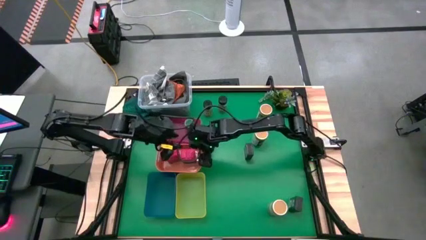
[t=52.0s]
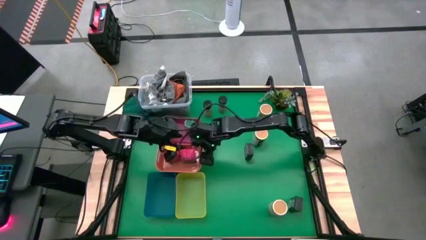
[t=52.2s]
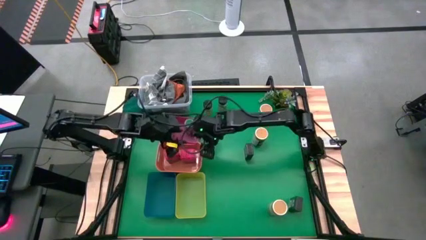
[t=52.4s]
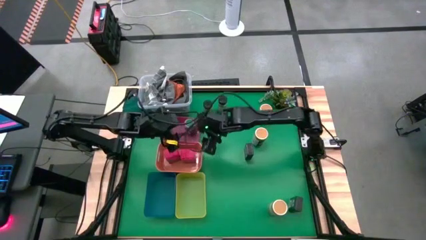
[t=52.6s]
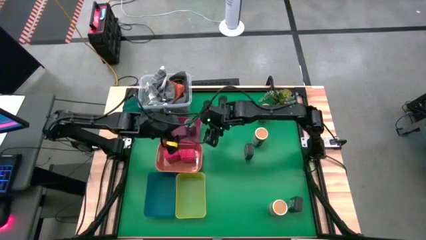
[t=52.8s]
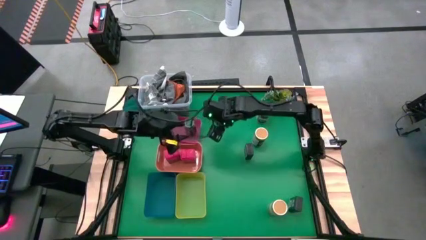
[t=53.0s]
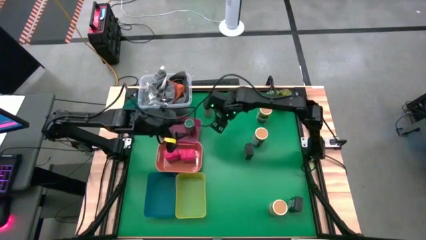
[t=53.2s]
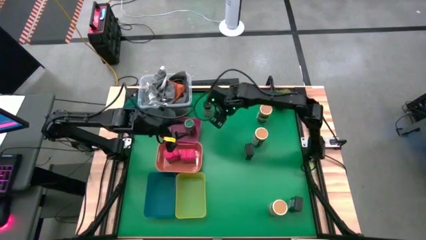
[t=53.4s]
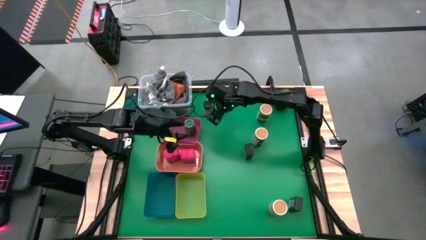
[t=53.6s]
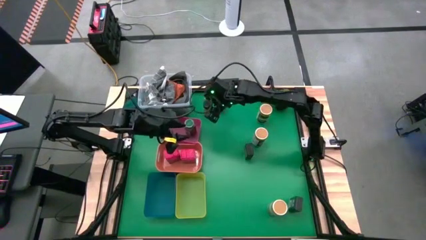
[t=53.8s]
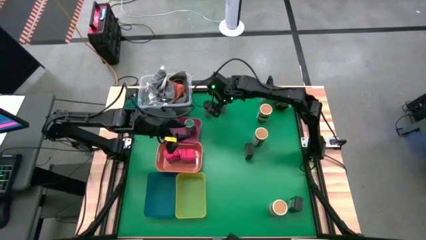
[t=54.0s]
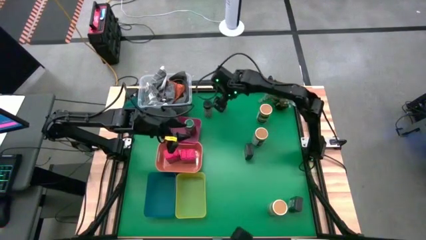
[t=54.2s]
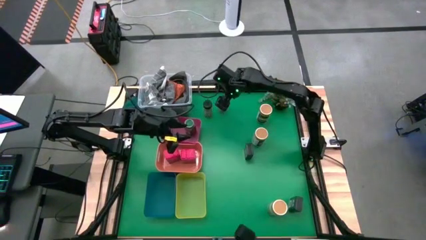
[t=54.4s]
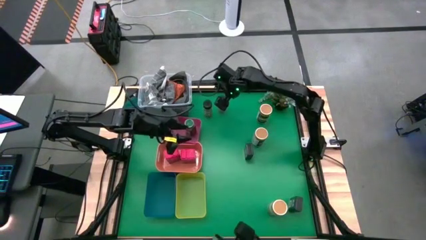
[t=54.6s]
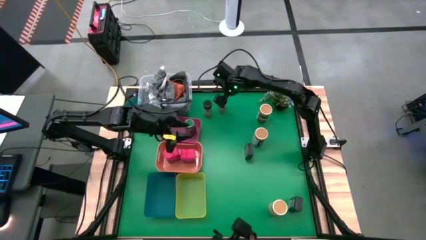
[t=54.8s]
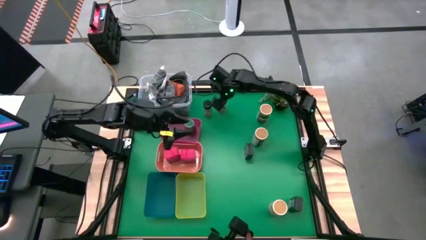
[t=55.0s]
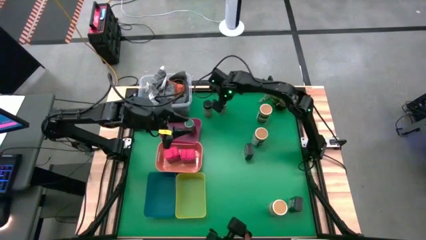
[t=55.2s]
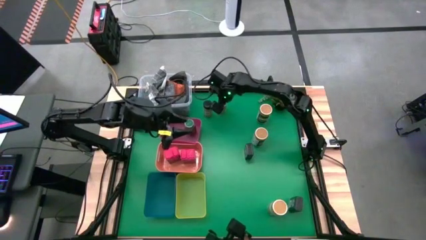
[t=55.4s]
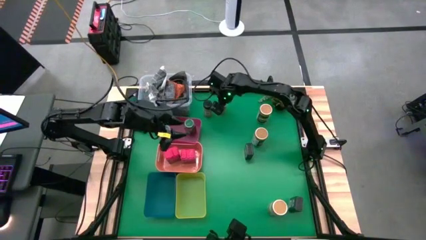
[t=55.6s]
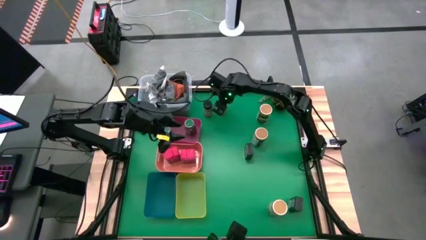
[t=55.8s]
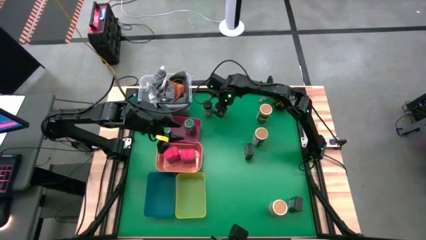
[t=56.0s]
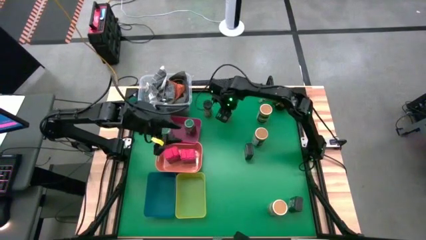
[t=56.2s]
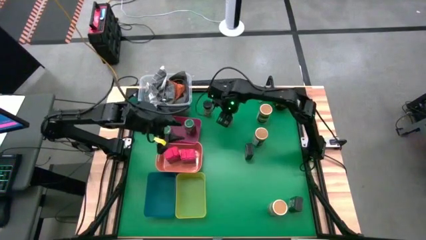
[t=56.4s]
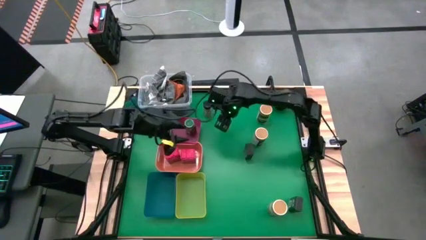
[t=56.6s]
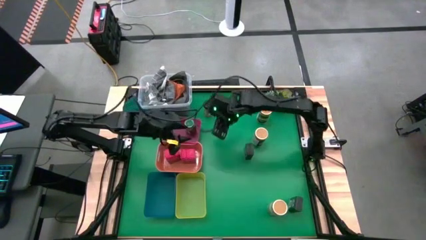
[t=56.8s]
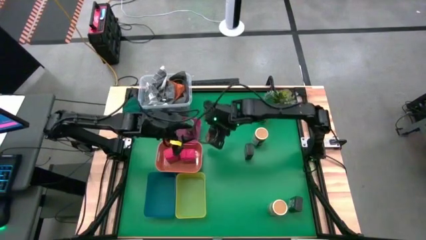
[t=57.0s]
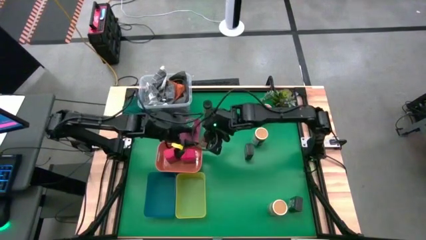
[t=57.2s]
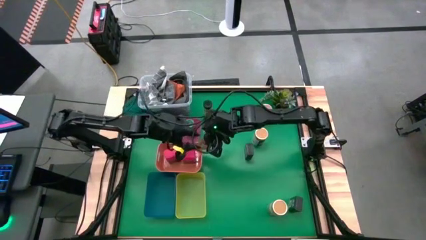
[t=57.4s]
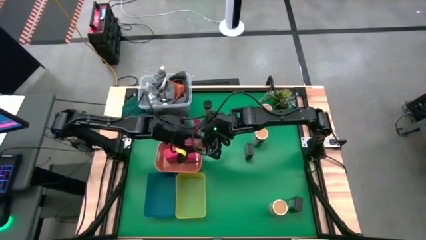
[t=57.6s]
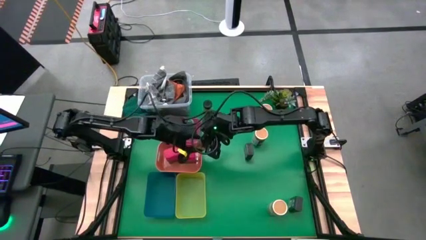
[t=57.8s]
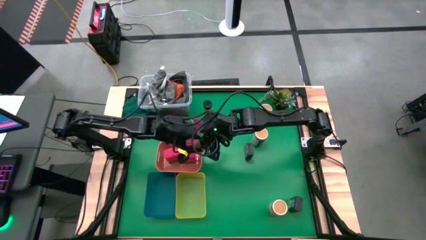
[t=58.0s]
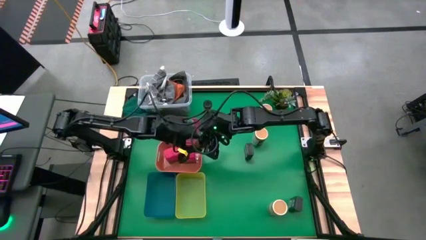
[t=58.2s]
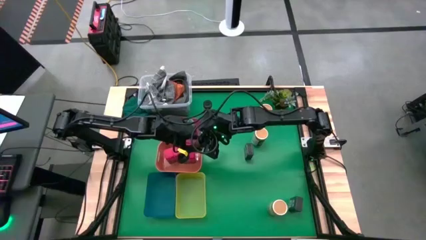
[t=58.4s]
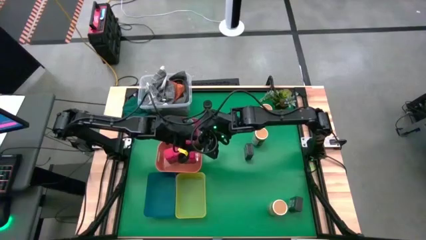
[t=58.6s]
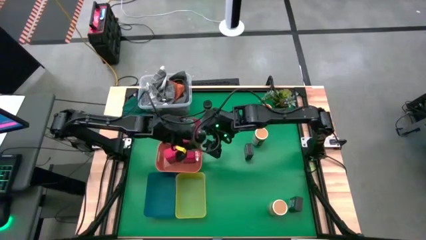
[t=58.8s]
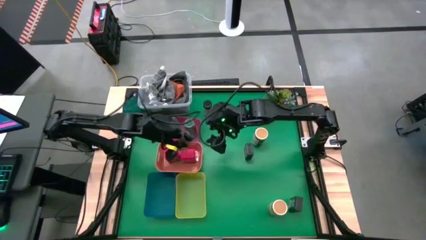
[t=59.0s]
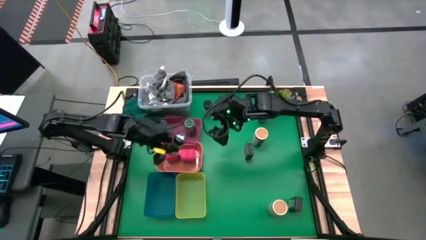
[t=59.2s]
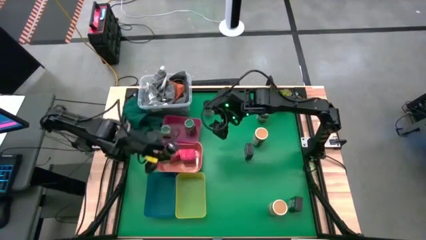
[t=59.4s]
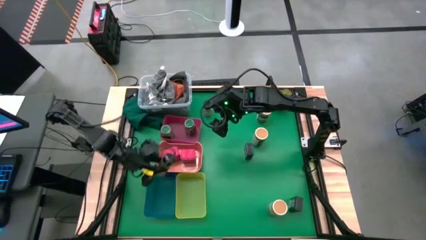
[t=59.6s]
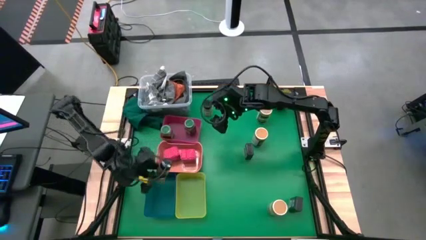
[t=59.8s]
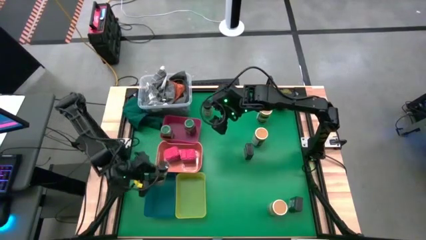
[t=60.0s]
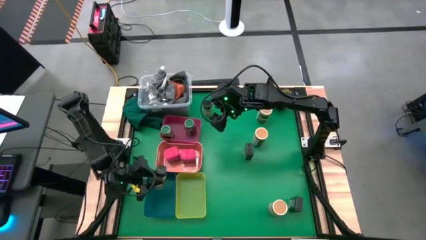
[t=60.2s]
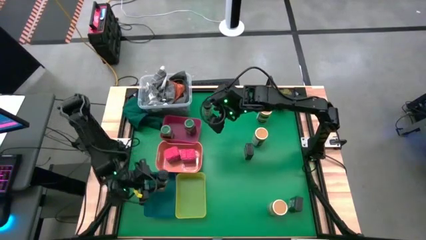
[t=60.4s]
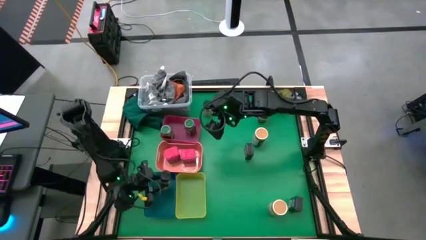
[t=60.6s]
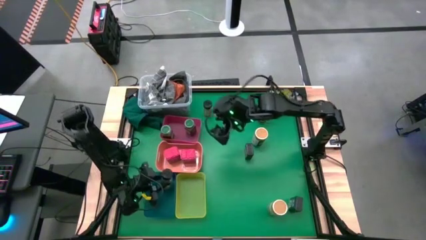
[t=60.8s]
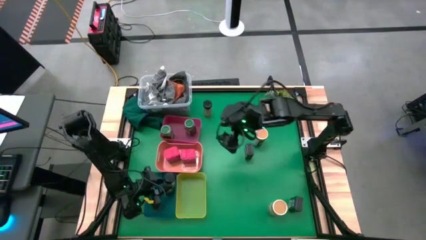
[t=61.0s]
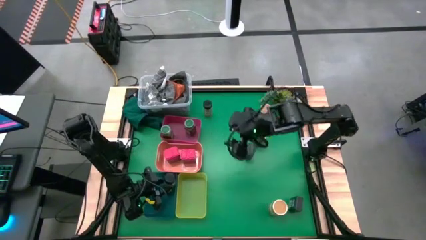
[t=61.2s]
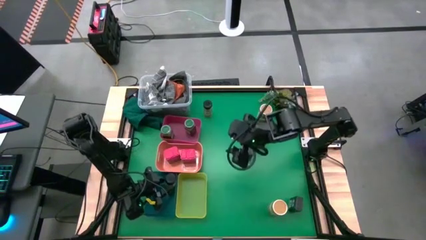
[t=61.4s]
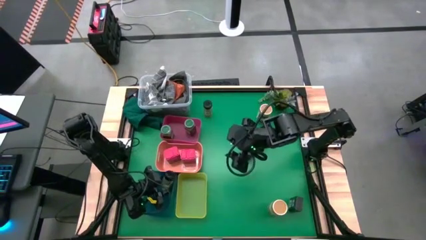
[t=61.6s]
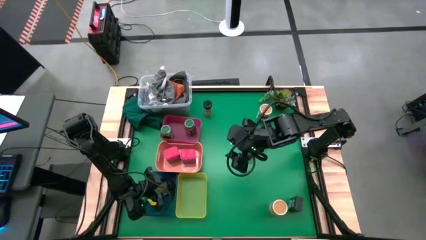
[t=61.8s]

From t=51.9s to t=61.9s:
Task: Sort spices by type
Put the right black seasoning bottle into the blue bin

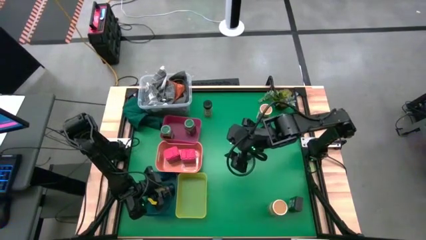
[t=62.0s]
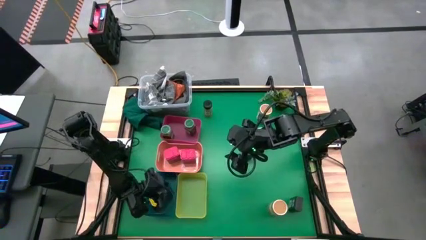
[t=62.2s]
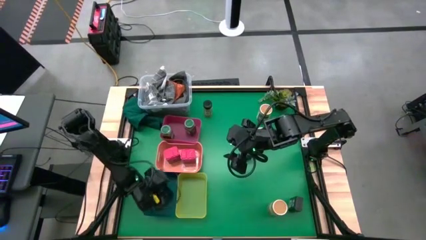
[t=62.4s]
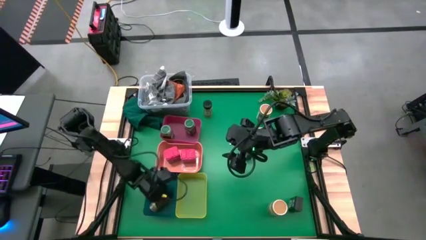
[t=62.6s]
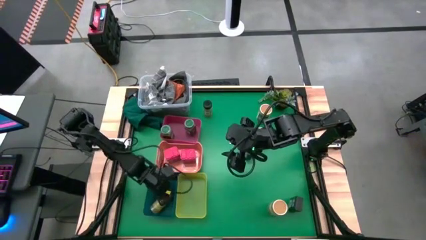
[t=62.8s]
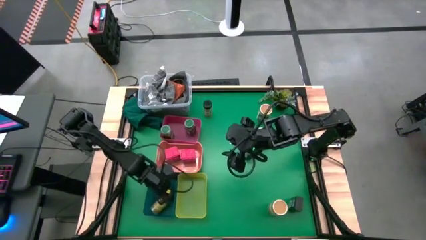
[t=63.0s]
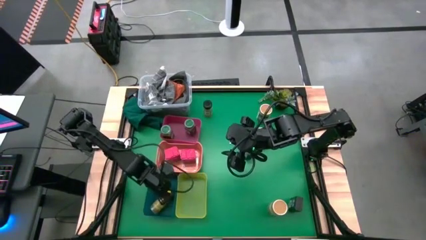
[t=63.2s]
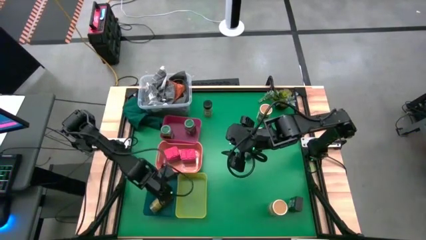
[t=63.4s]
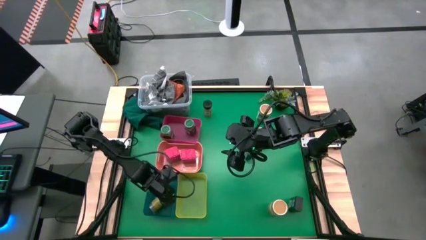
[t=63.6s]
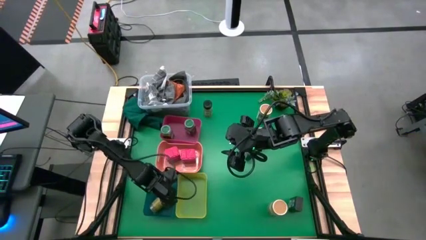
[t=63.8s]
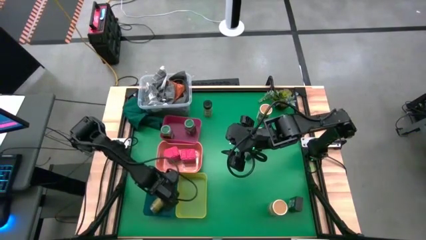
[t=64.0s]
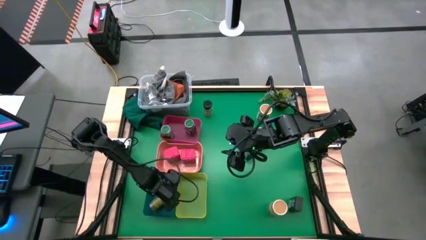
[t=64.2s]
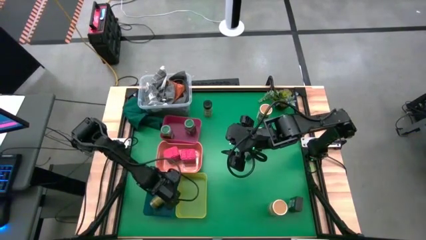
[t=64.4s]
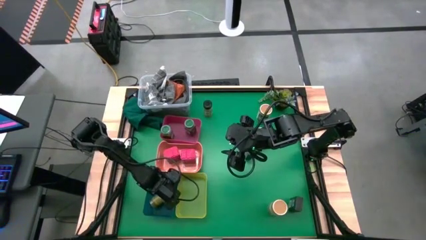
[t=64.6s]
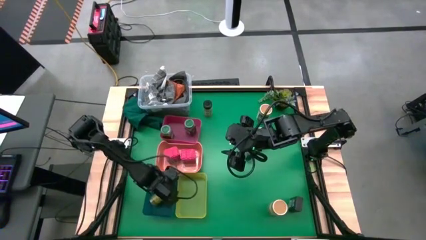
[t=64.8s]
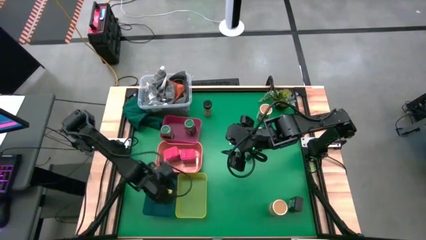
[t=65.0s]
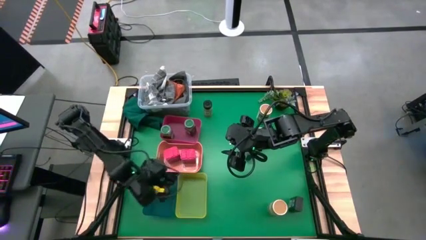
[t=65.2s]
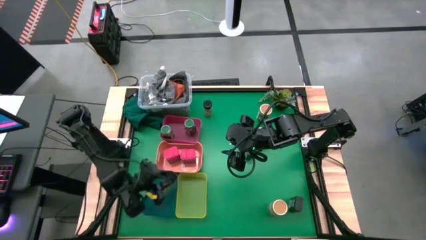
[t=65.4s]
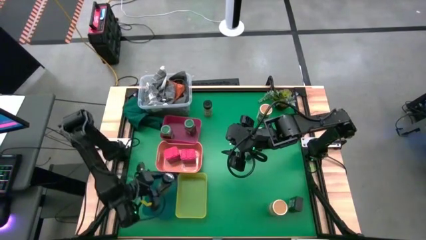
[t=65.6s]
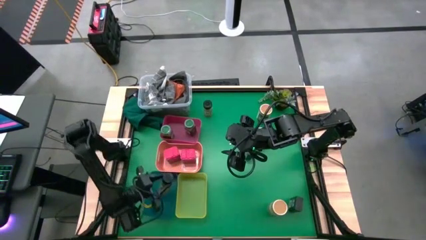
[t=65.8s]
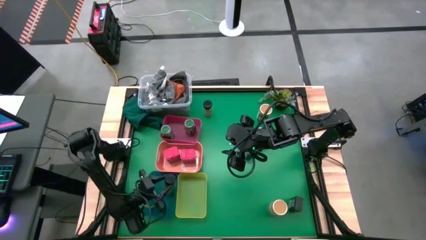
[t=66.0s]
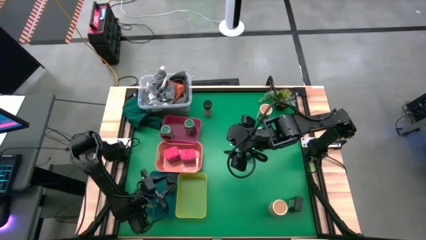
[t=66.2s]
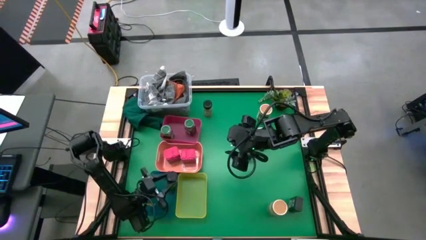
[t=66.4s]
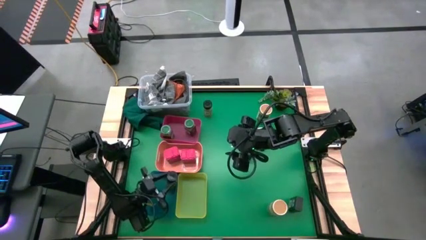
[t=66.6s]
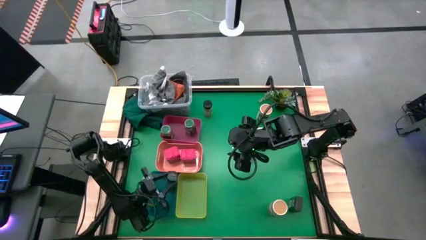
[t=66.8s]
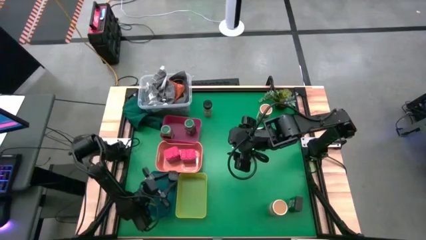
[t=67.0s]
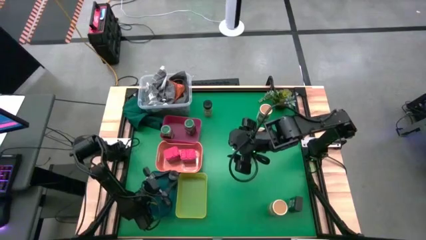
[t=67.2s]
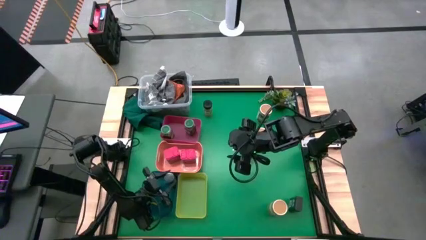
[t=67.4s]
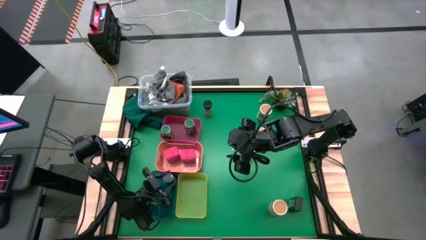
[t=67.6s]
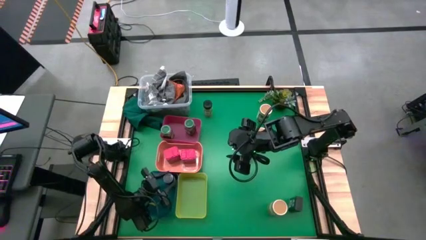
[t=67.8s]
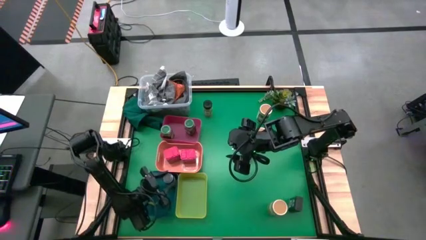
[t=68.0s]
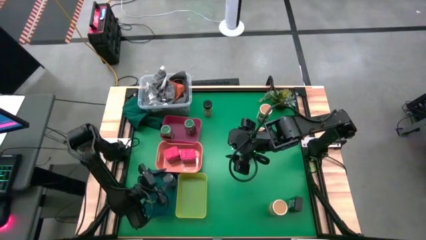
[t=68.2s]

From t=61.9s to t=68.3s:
Put the right black seasoning bottle into the blue bin
